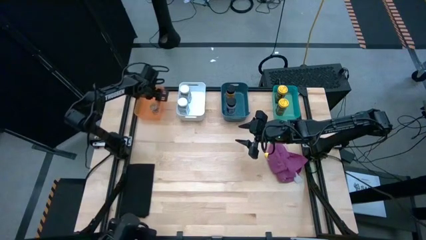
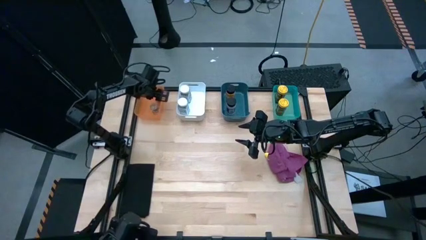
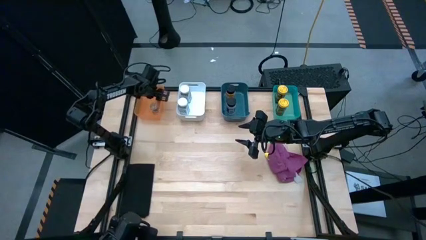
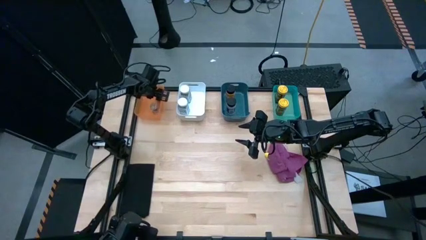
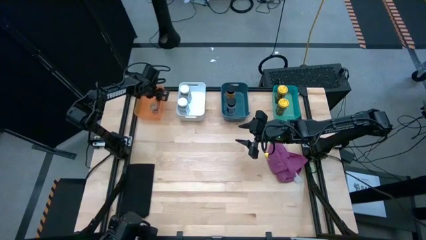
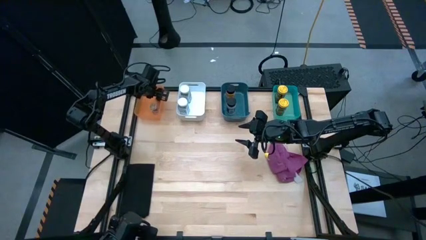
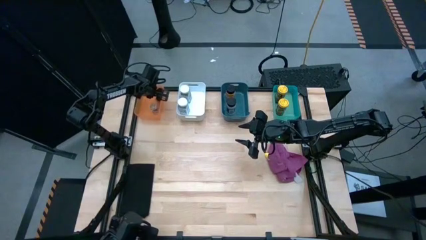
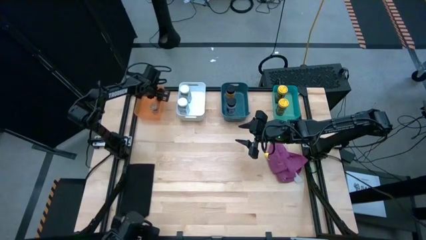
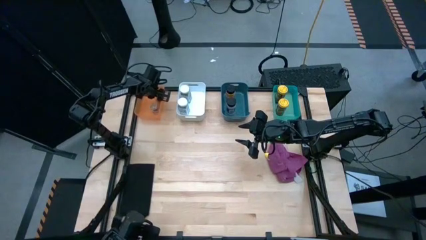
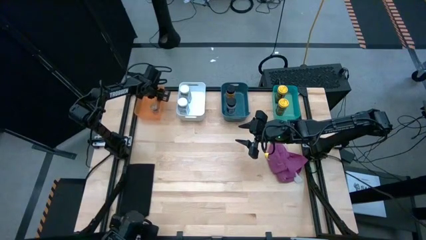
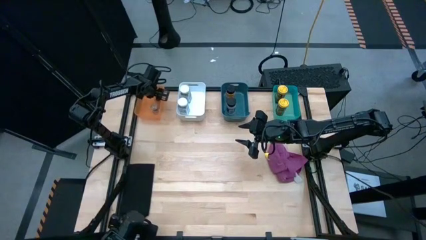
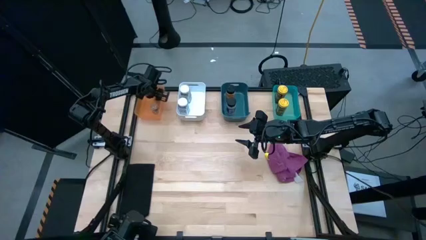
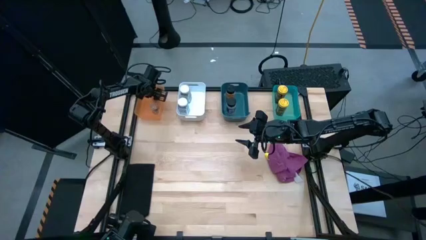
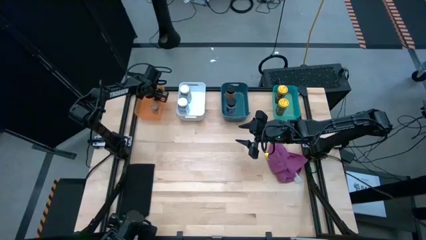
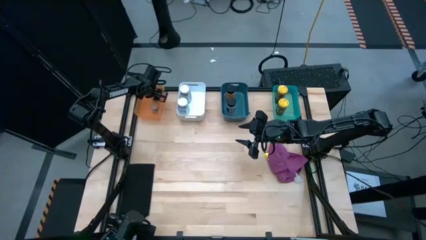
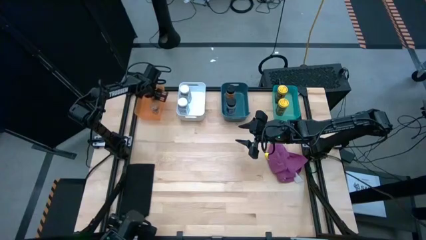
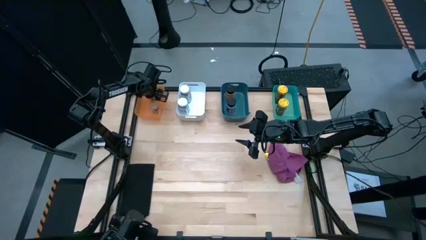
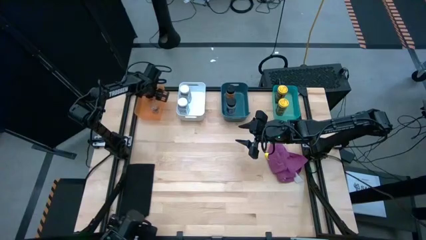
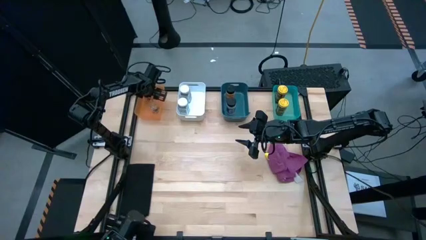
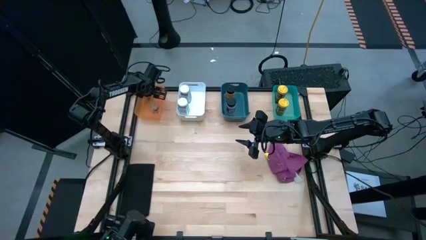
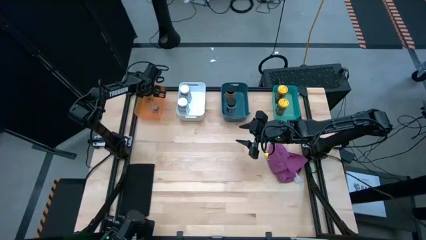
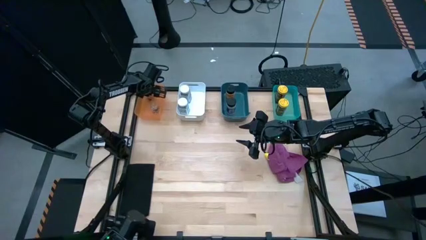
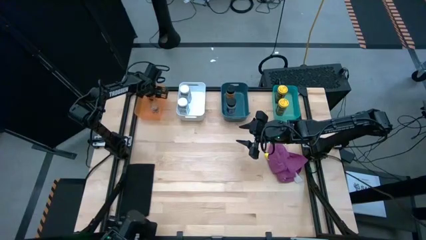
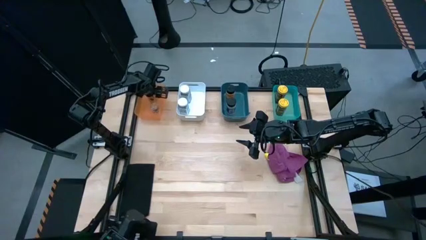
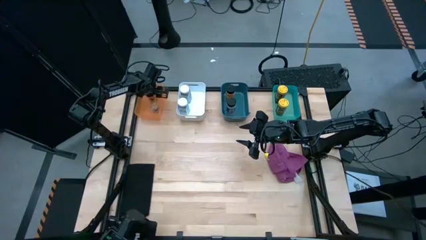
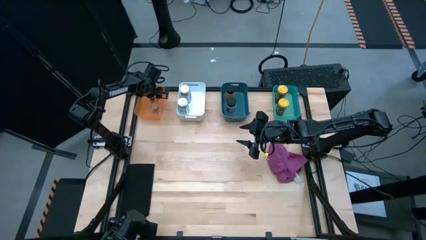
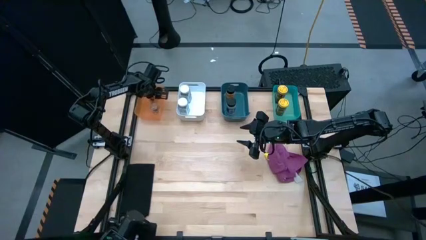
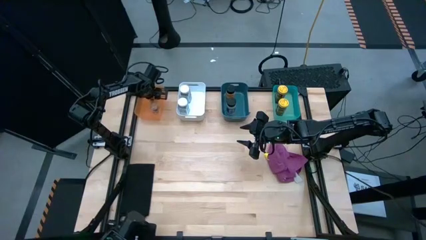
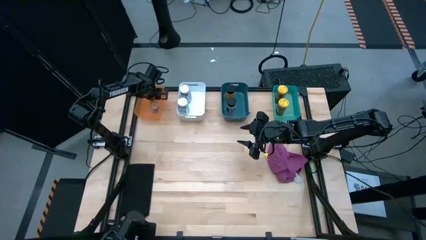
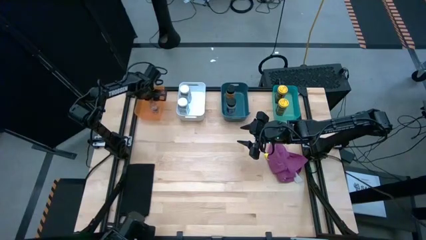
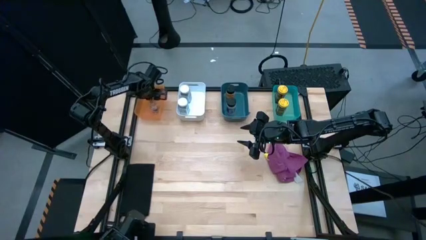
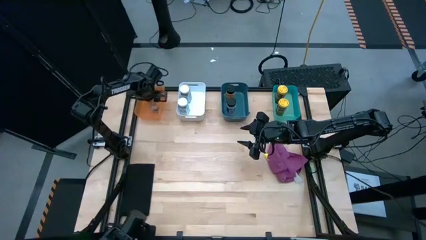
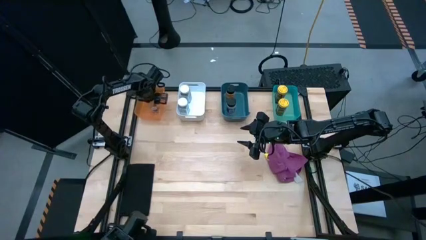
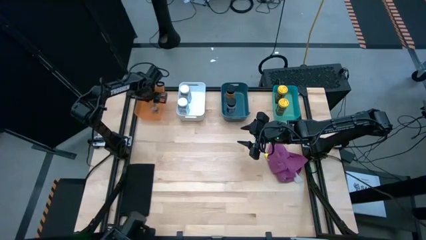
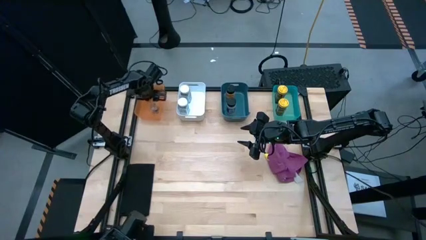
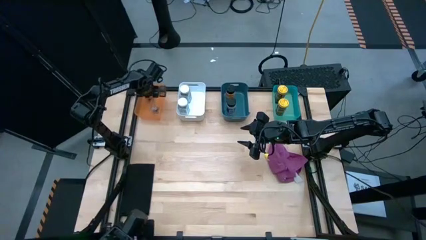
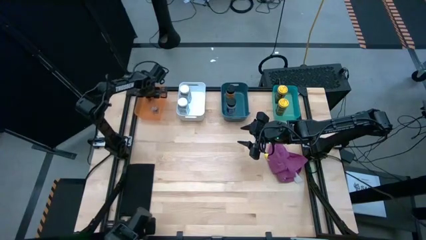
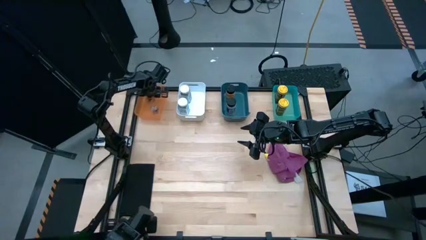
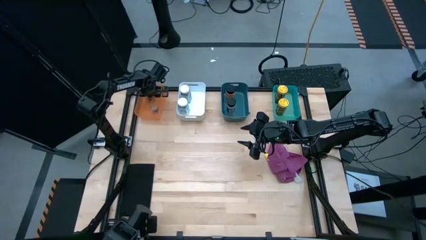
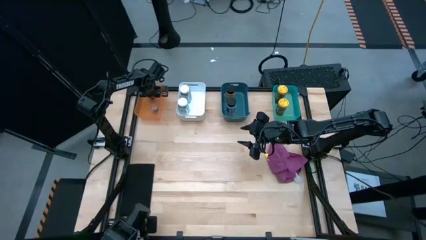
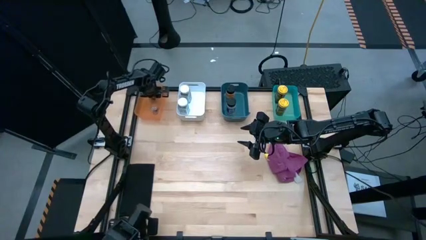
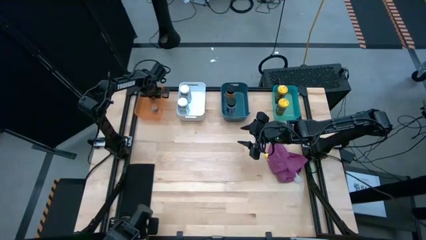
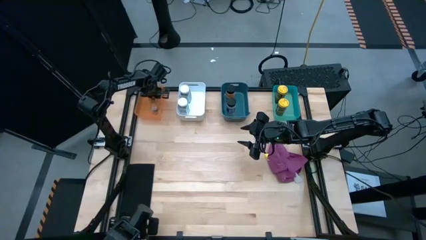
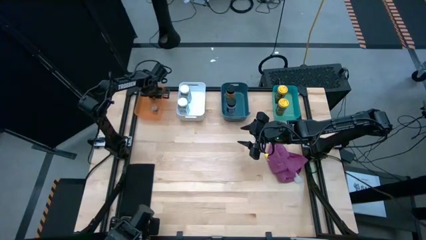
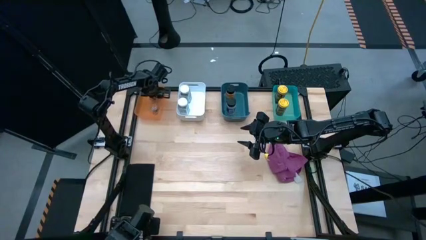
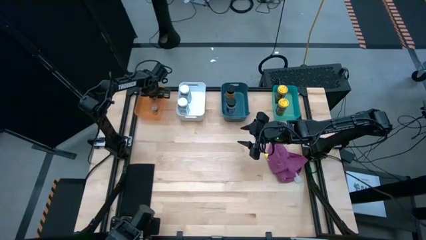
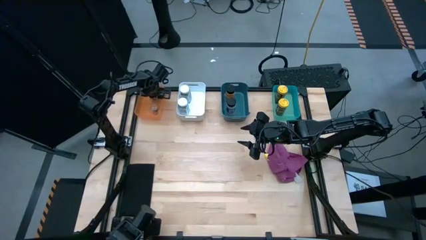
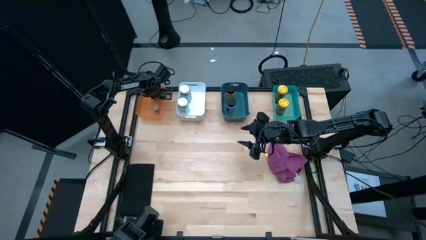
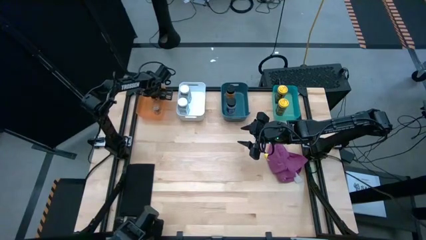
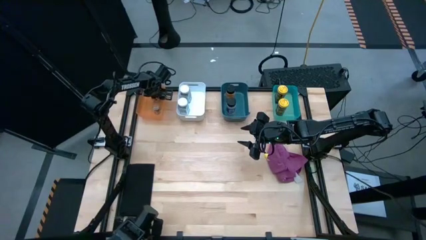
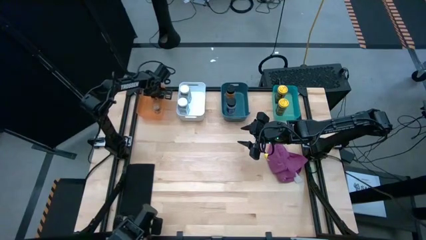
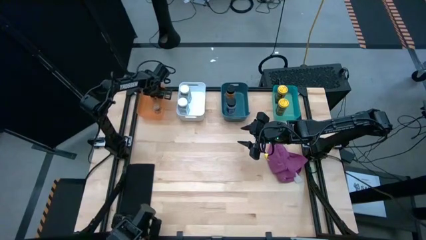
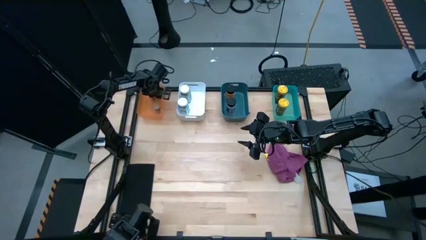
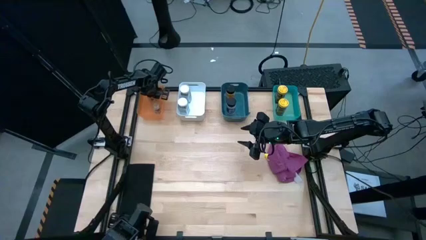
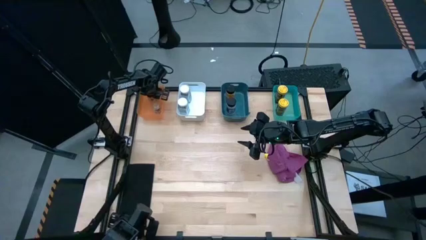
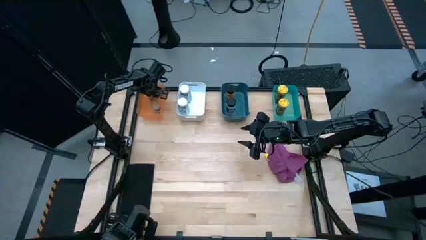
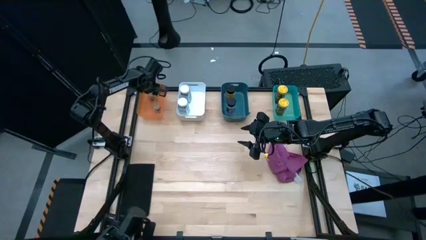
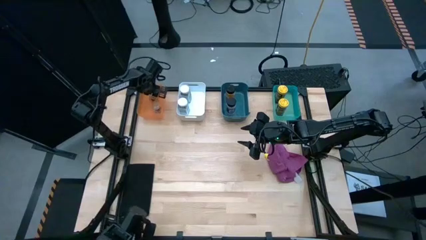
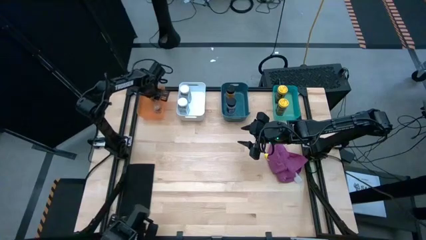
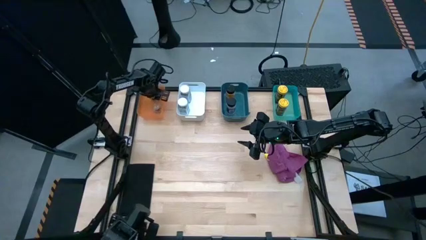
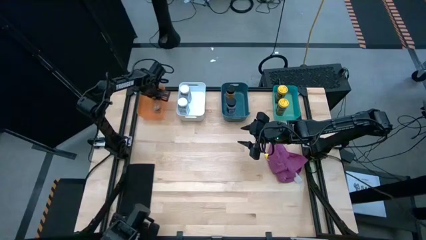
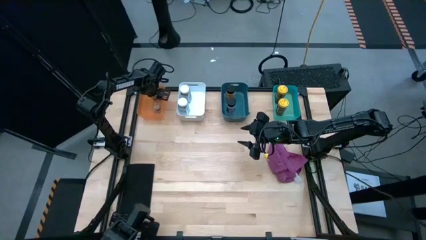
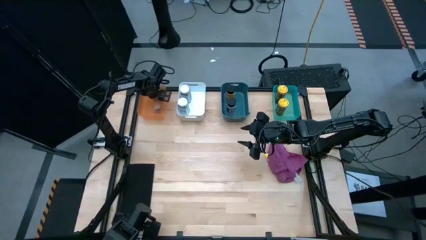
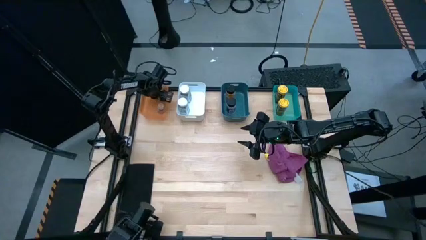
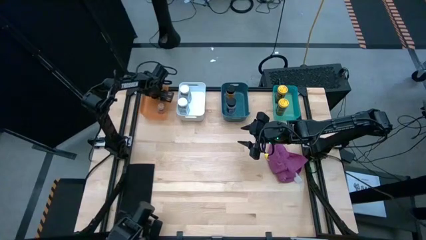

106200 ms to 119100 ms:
Task: Sort spices by type
Put the brown seasoning bottle into the orange bin

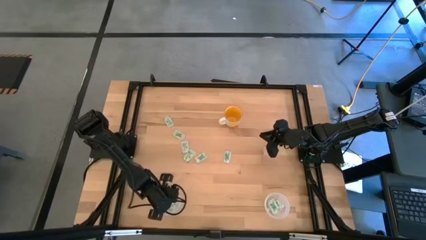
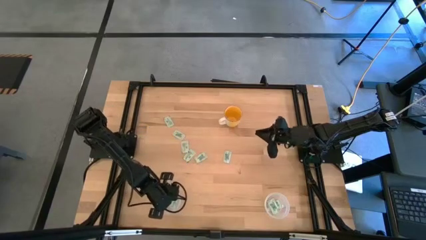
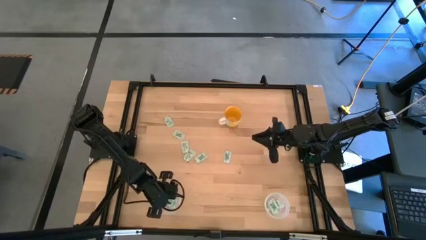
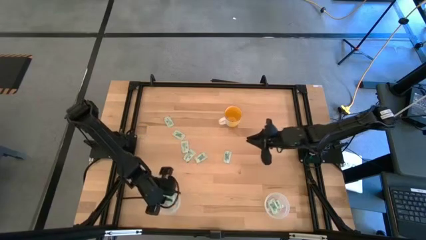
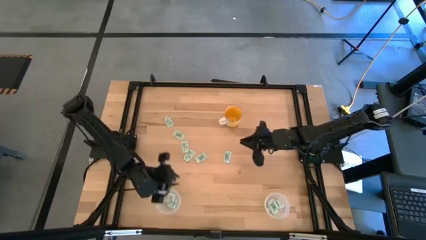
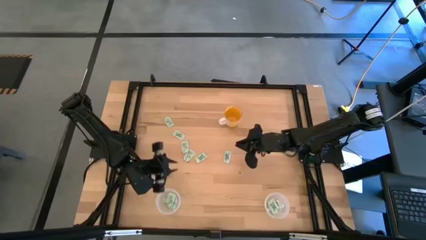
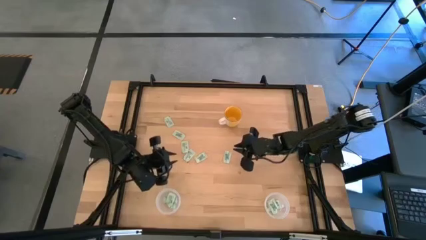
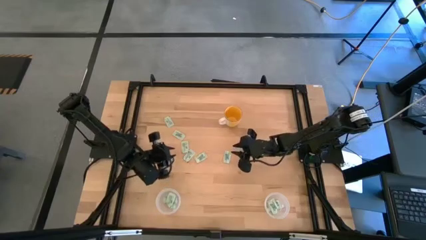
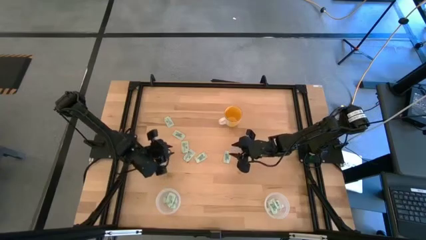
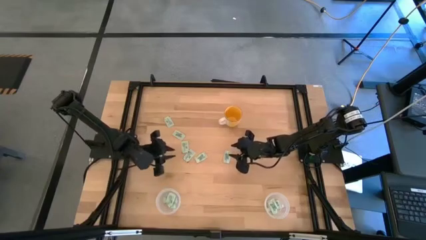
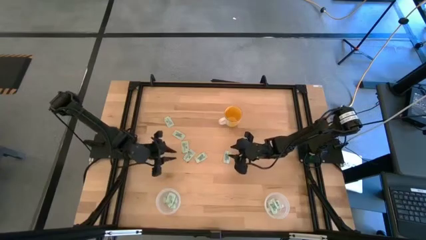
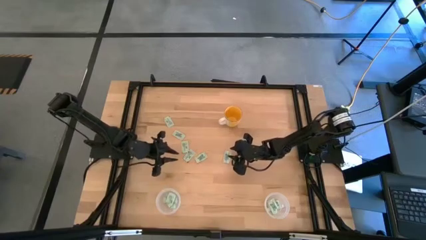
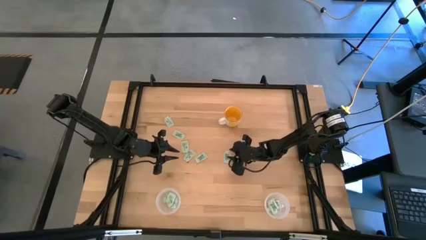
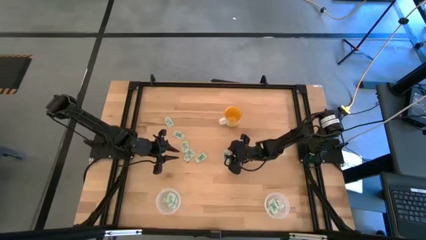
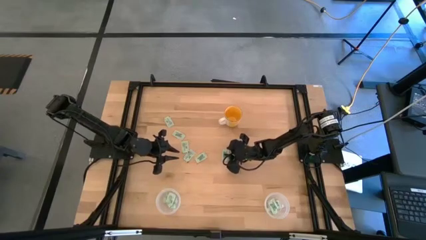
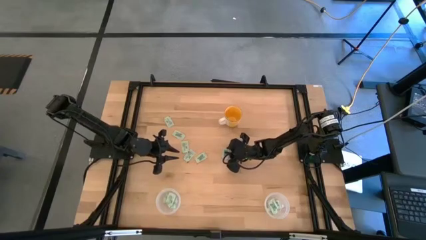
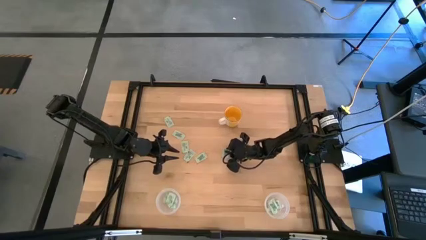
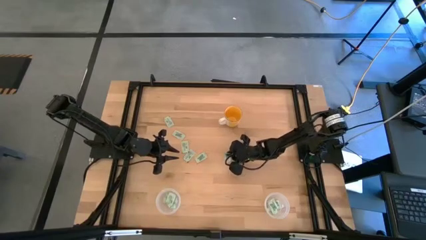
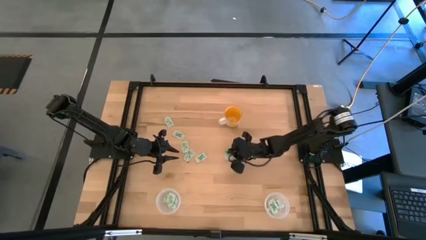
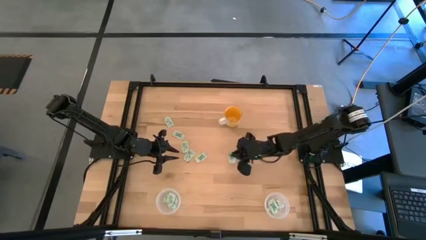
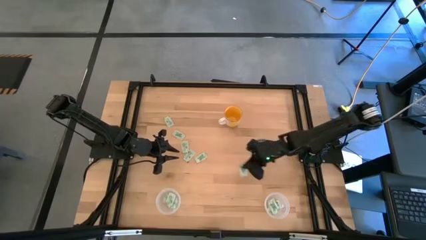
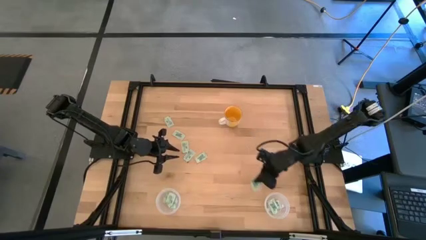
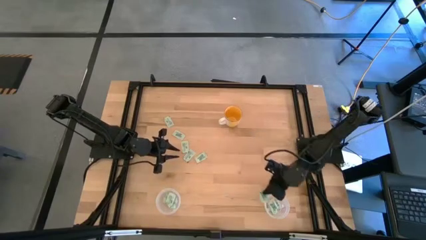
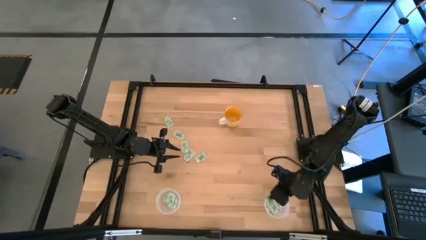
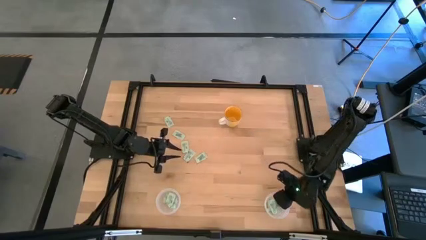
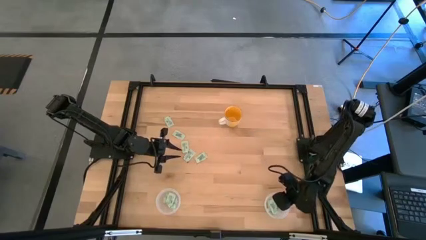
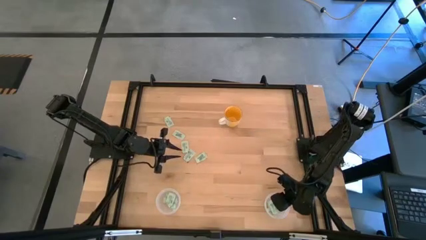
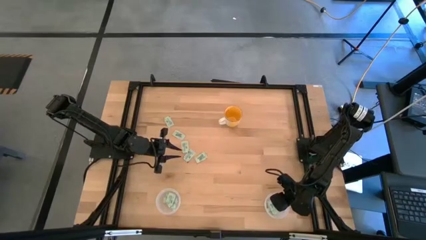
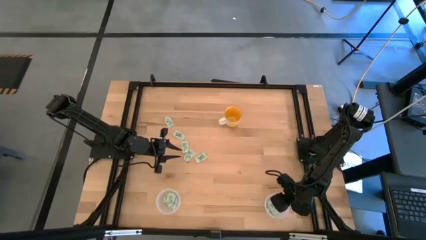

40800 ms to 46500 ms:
Task: Pick and place items into bin
Put the stevia packet into the right transparent bin
